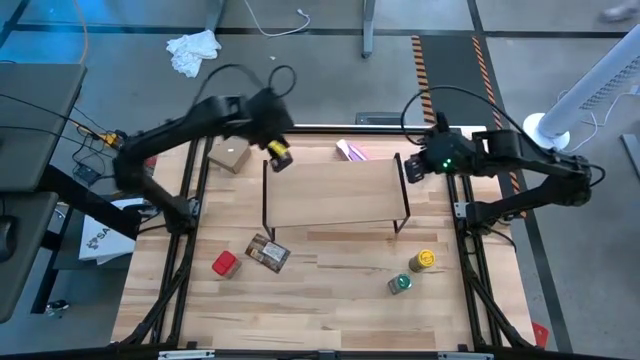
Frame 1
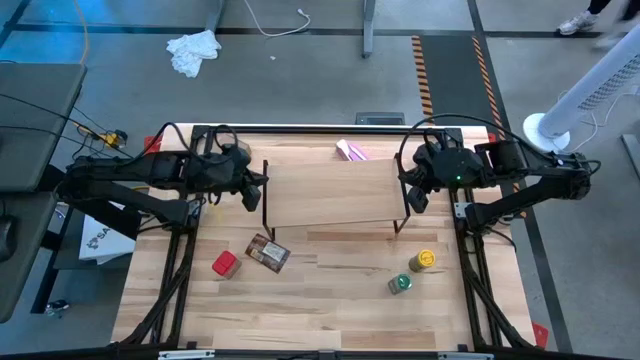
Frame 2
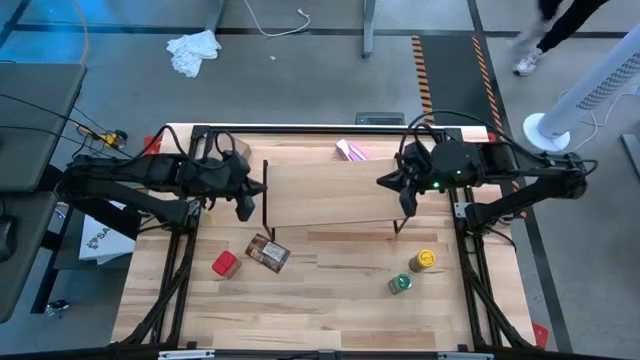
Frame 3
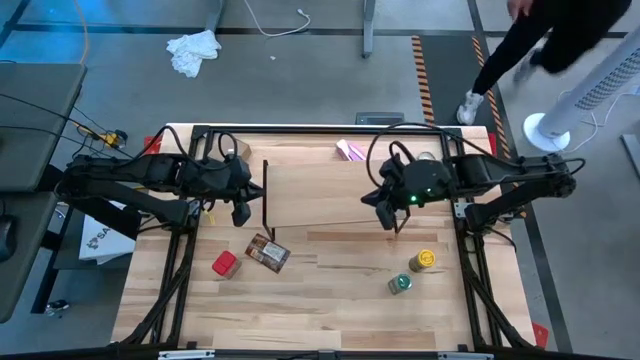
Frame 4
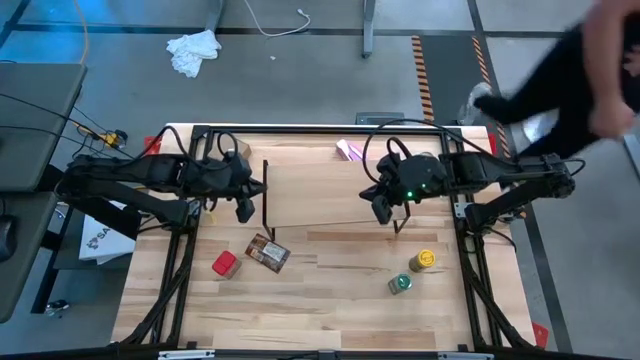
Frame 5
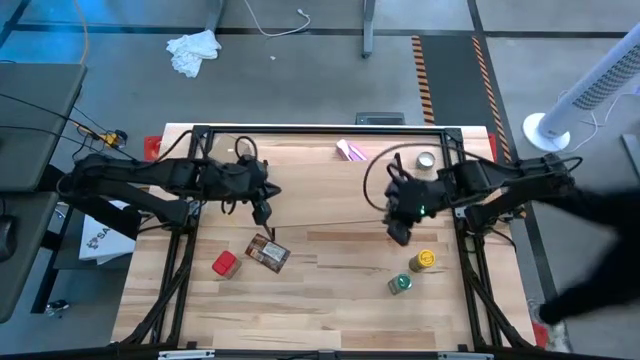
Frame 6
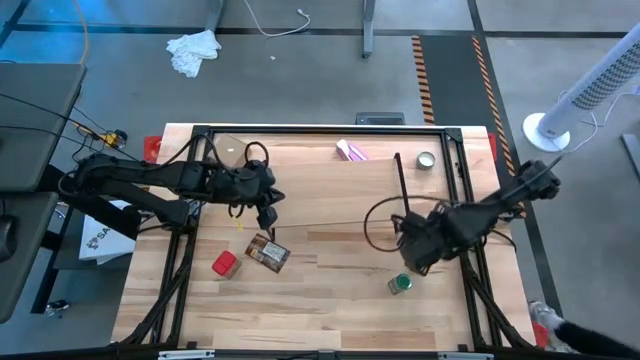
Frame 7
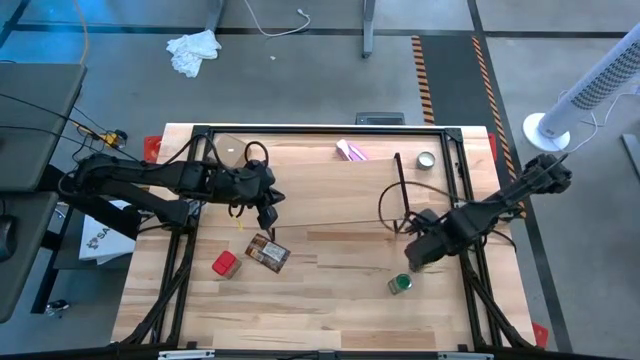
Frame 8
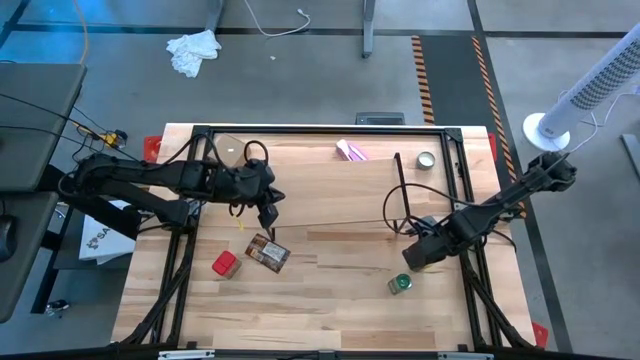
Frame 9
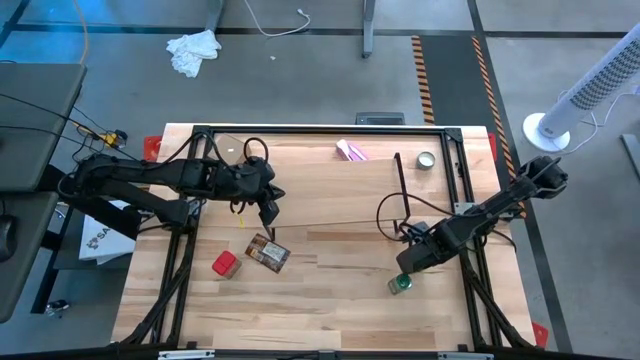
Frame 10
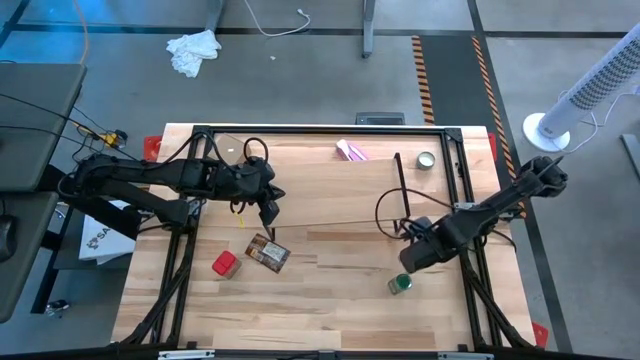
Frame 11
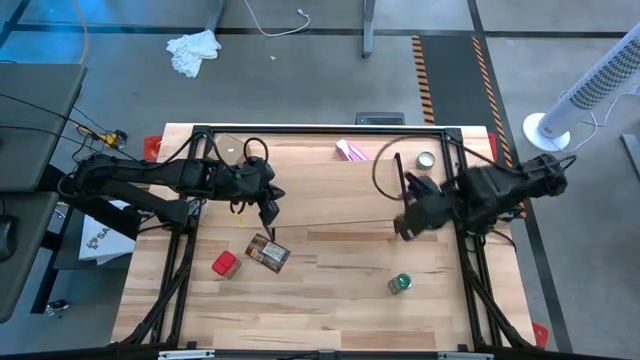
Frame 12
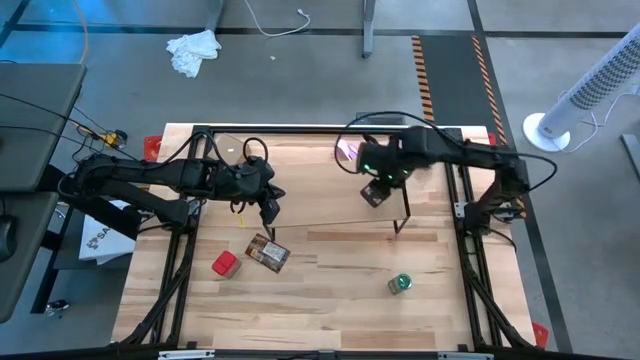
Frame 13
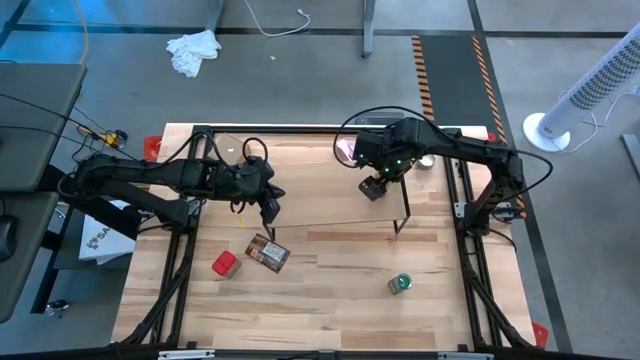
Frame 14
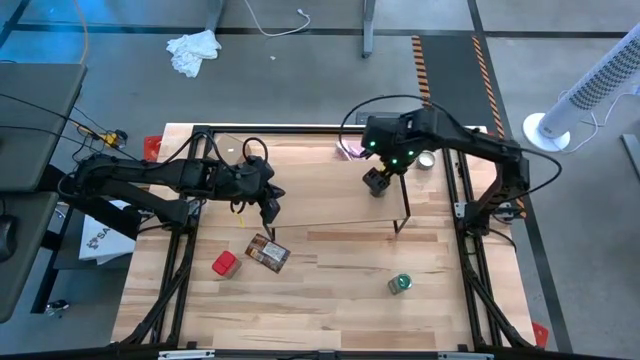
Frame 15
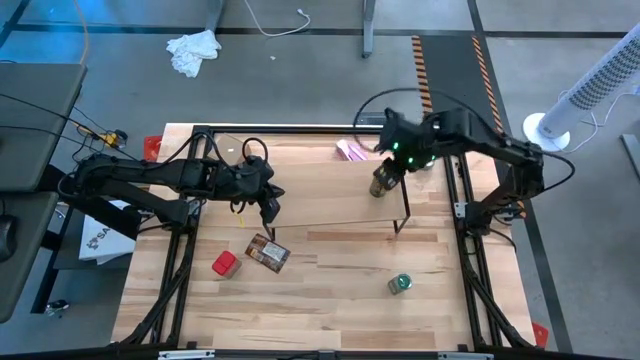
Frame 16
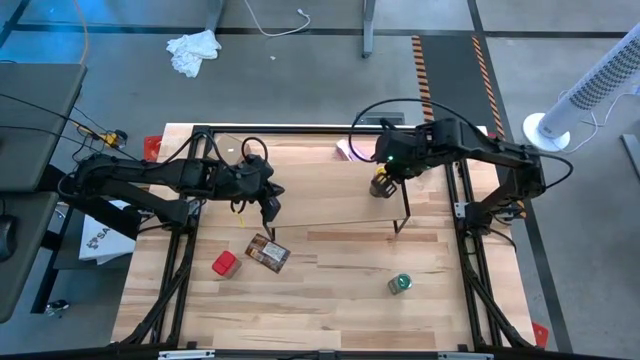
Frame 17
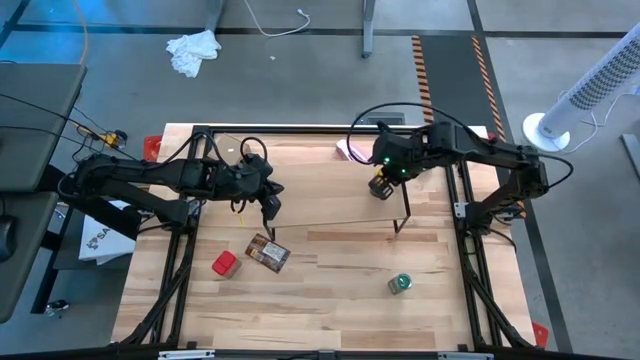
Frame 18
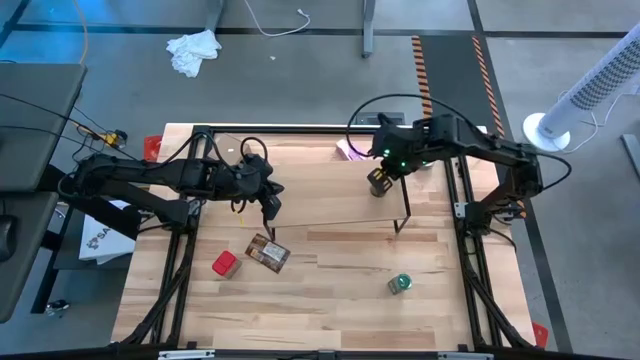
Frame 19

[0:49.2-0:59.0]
Task: Shelf spices
Put the yellow seasoning bottle on the shelf

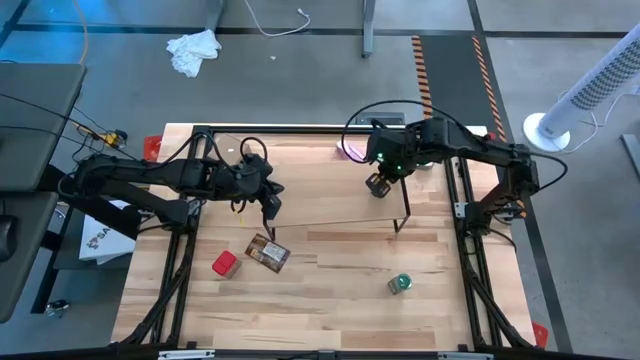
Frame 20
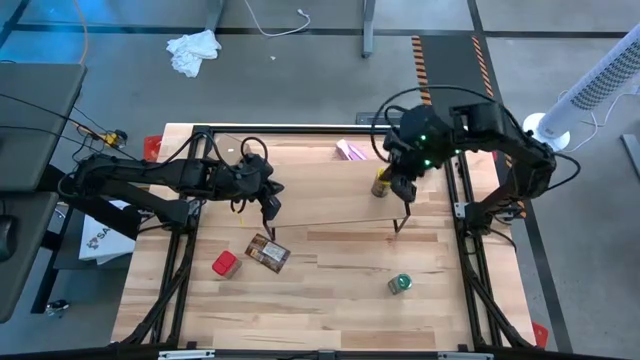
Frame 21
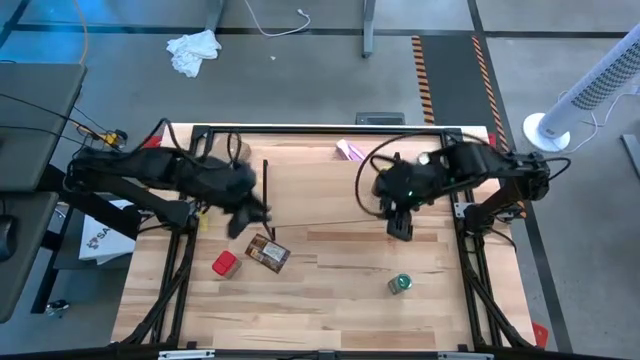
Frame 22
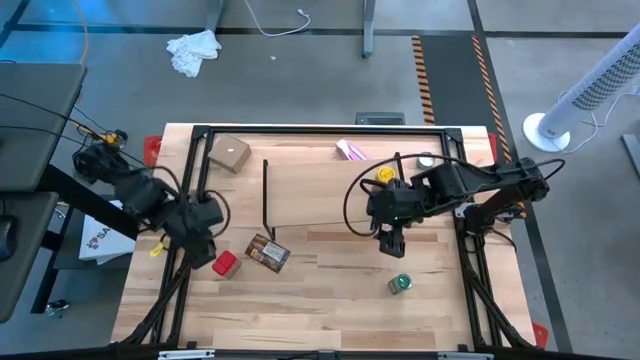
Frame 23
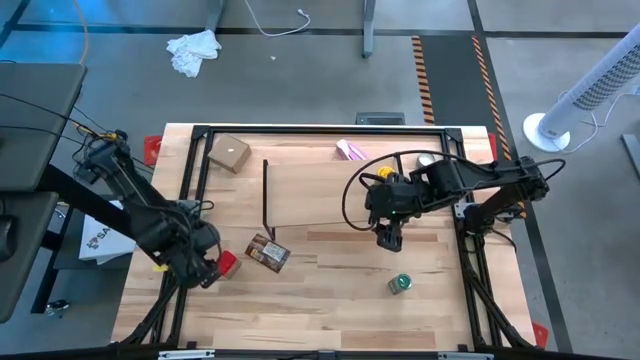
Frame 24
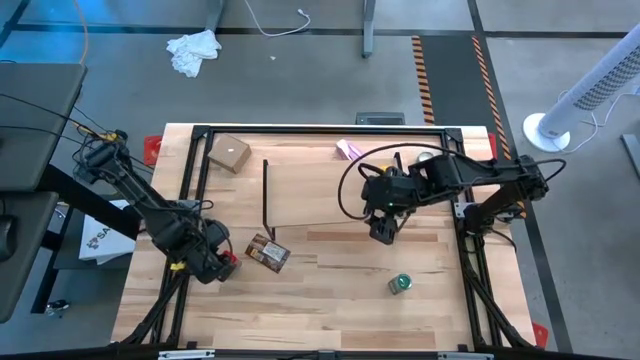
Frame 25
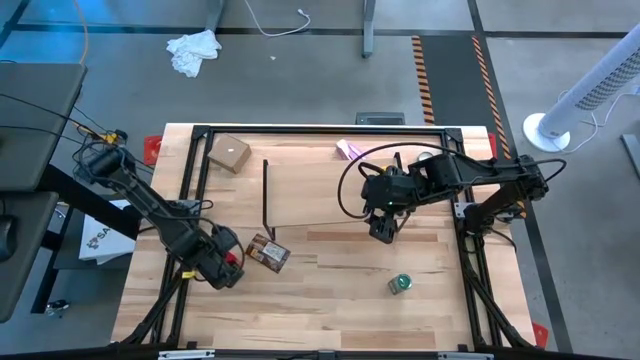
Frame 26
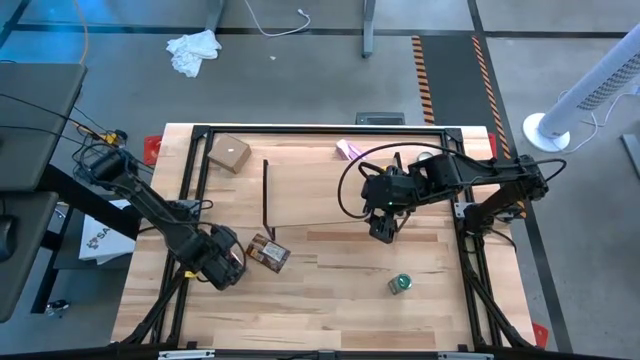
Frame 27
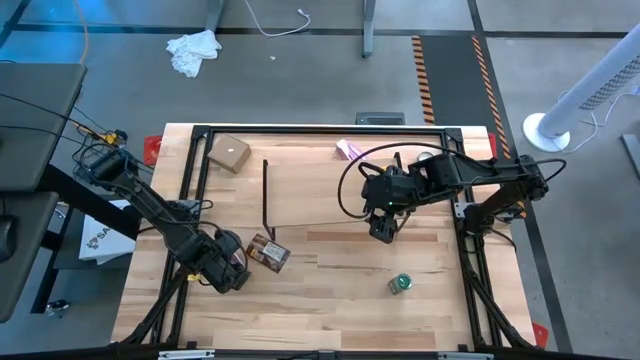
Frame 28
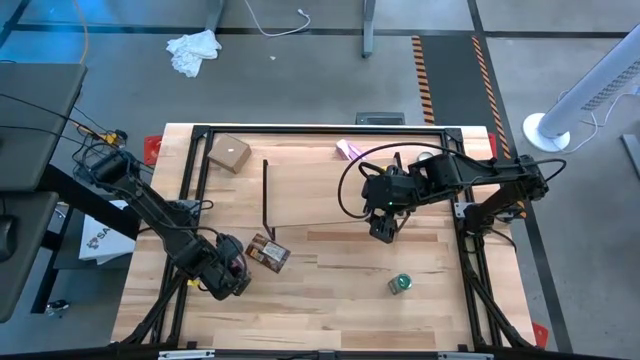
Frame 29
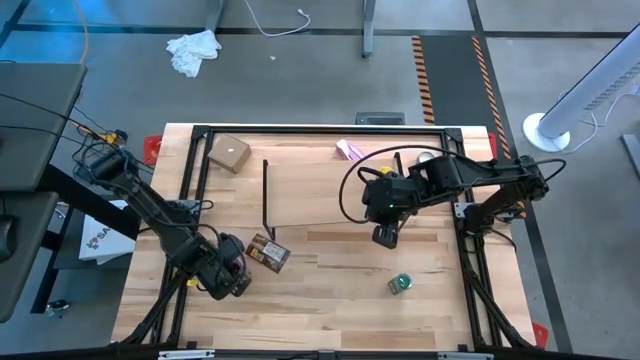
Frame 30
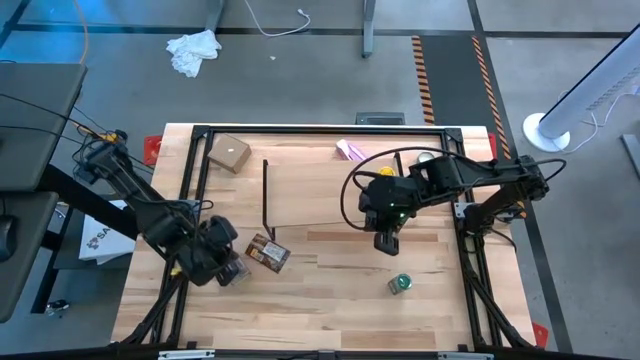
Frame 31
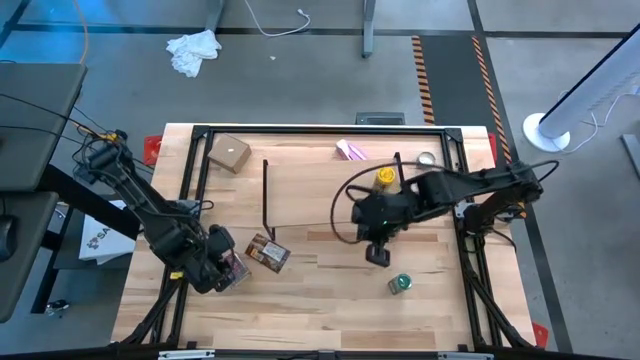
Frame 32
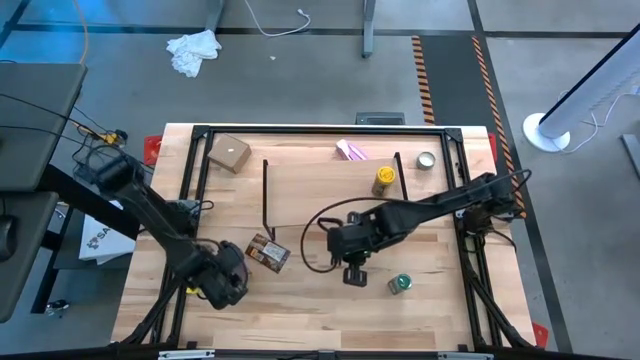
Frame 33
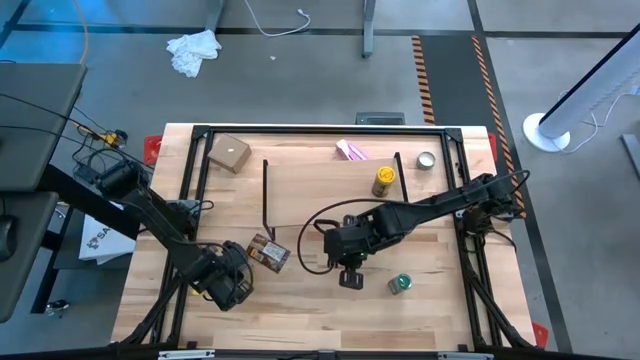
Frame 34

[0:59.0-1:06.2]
Put the red seasoning can on the shelf

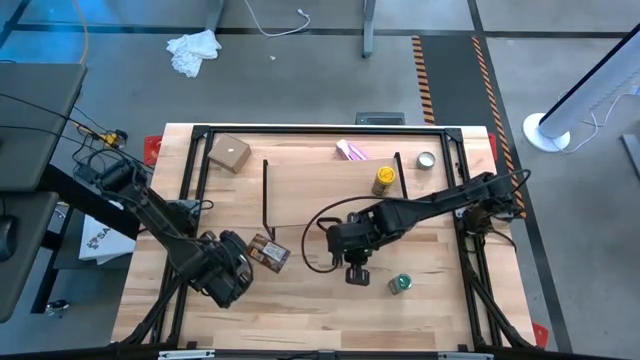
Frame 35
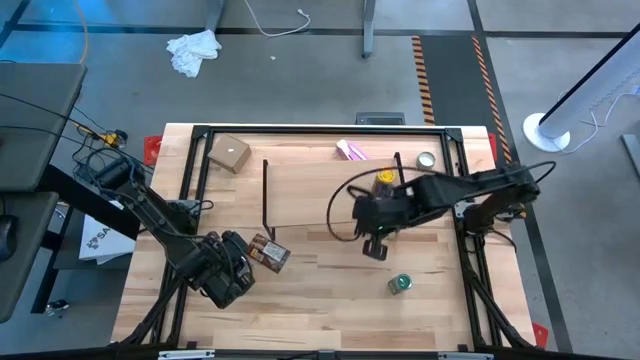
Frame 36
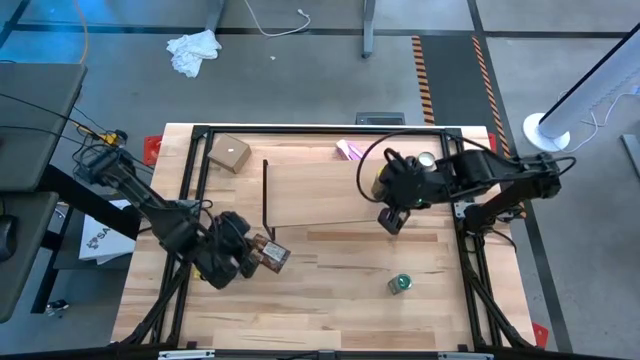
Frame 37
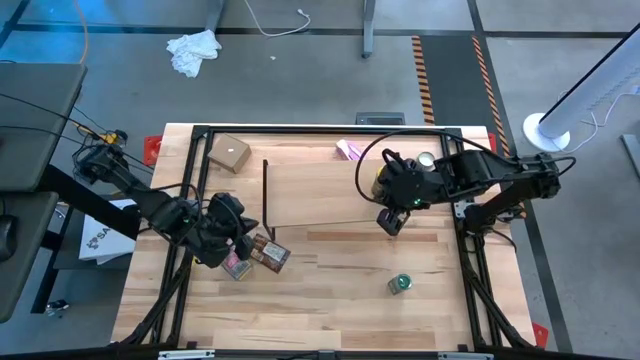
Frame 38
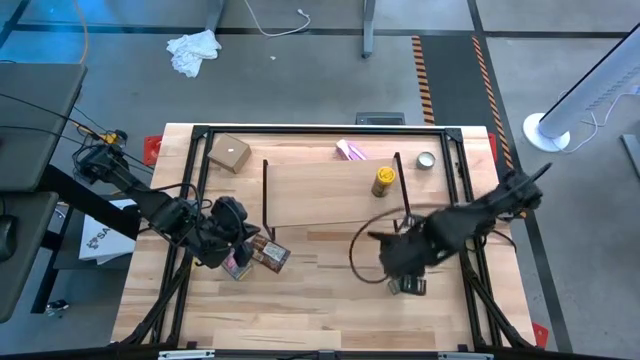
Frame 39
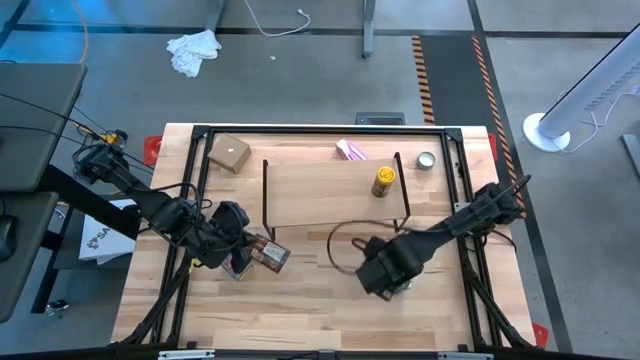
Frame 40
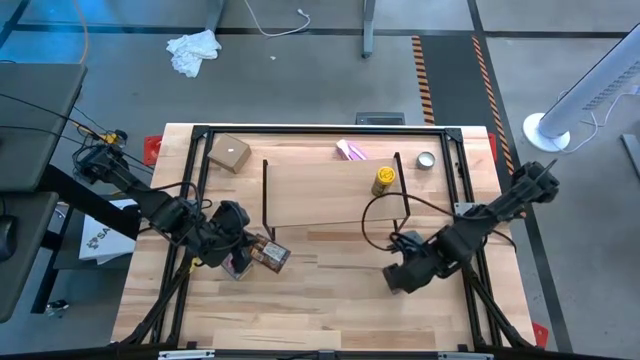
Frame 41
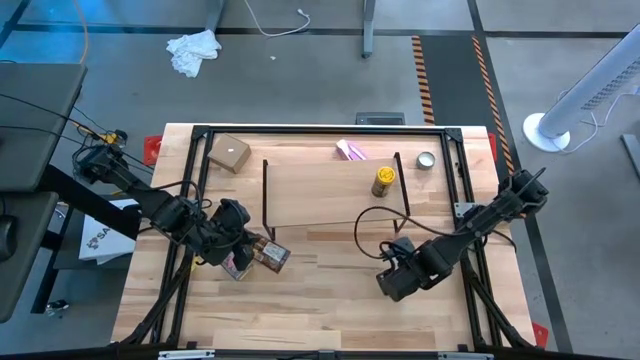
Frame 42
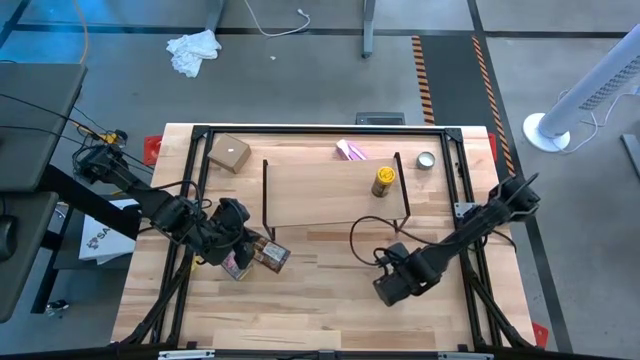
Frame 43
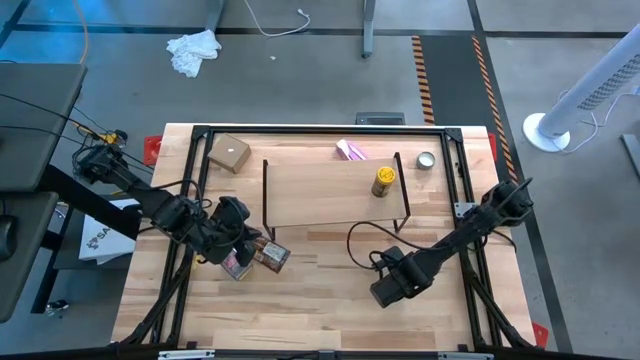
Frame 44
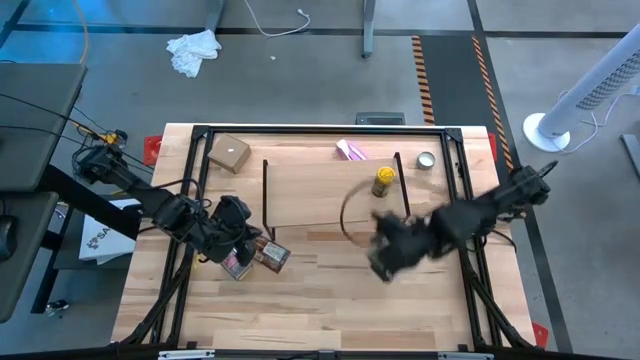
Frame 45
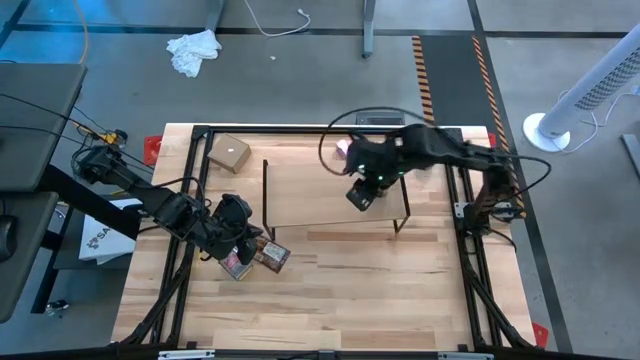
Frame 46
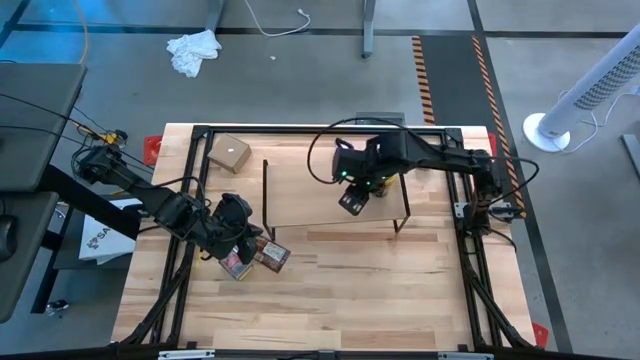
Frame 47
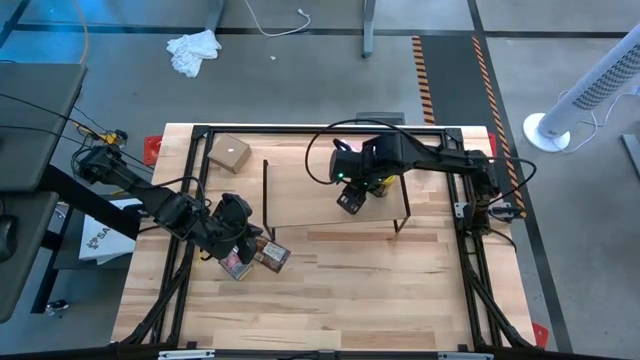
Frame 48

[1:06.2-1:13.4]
Put the green seasoning bottle on the shelf
